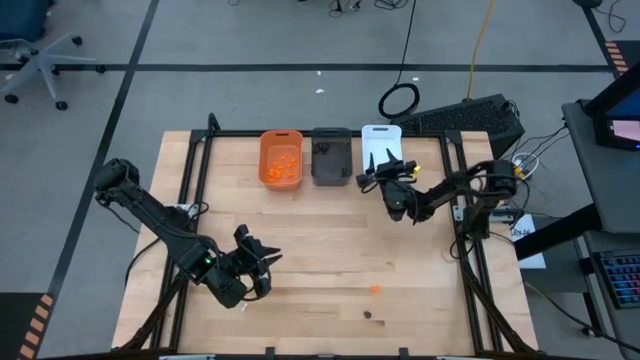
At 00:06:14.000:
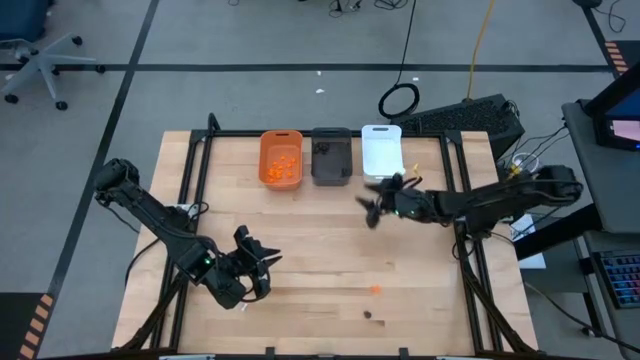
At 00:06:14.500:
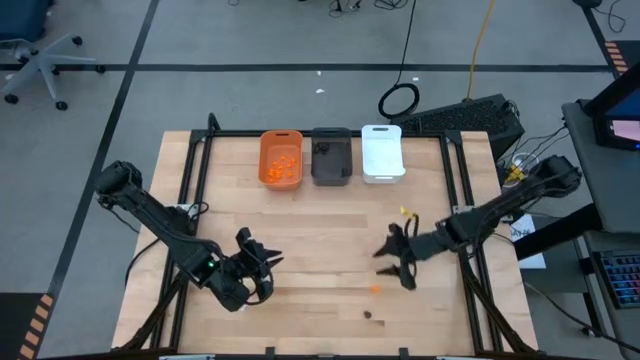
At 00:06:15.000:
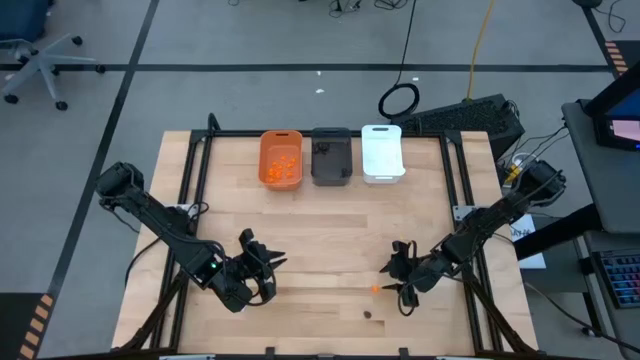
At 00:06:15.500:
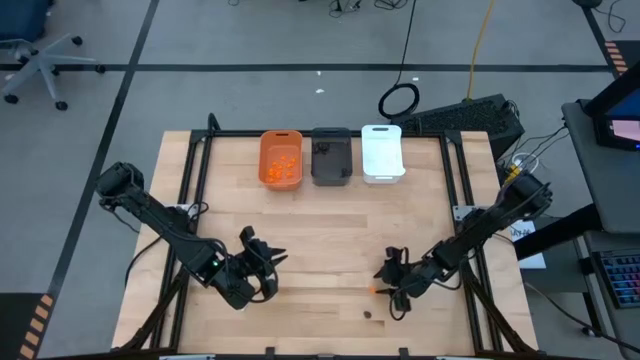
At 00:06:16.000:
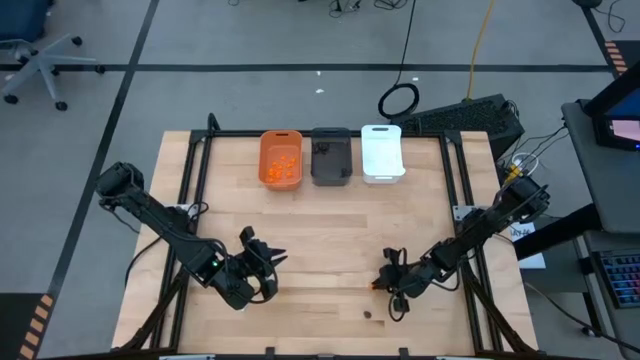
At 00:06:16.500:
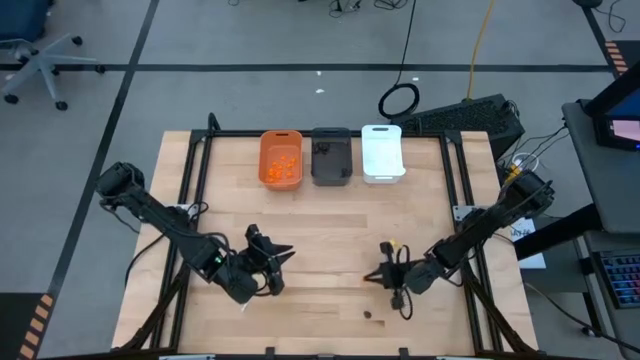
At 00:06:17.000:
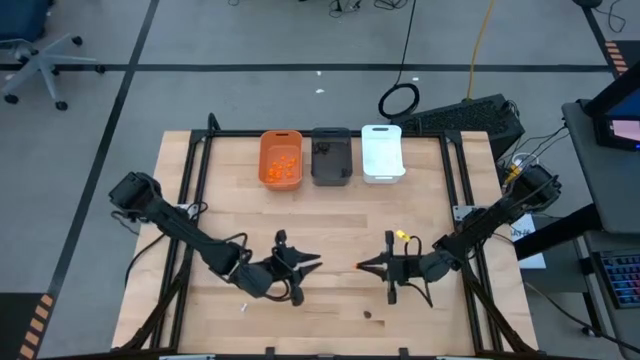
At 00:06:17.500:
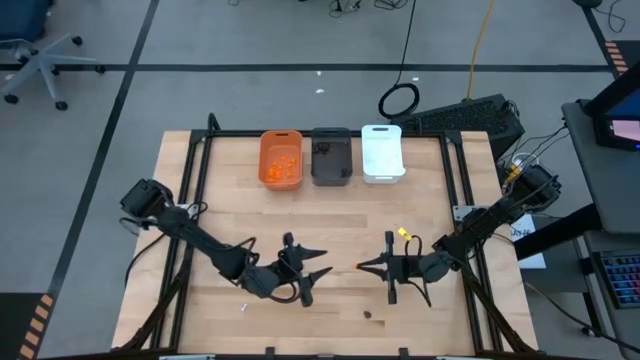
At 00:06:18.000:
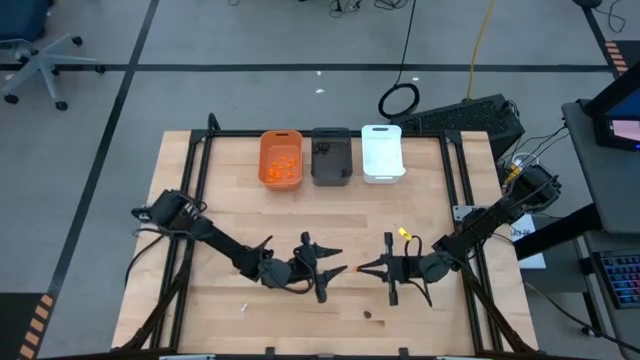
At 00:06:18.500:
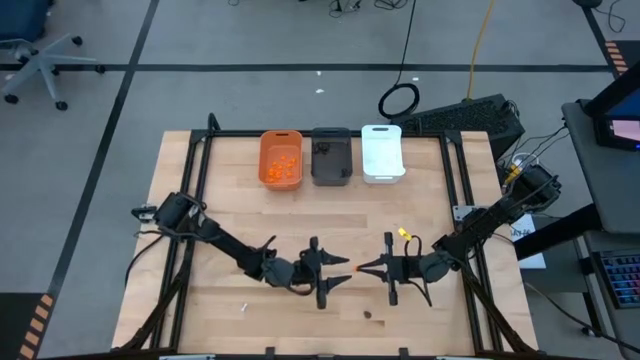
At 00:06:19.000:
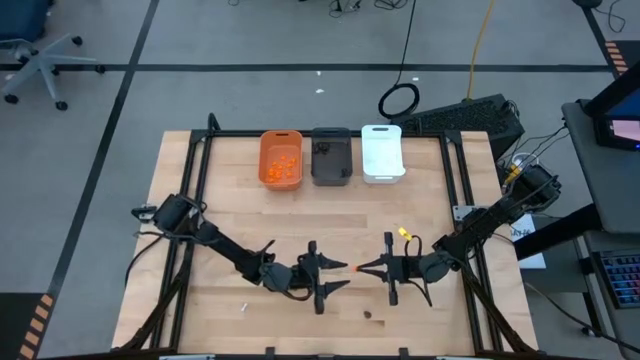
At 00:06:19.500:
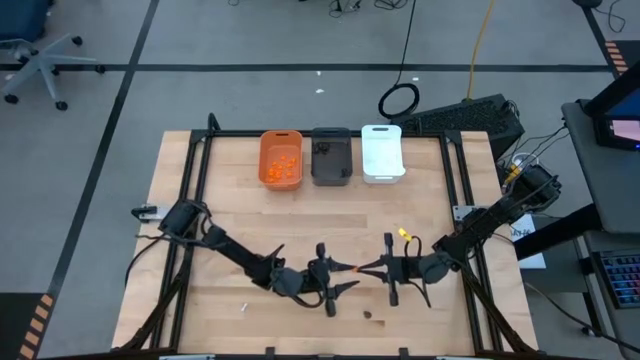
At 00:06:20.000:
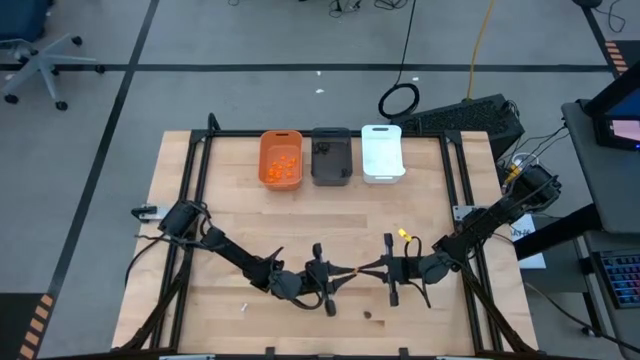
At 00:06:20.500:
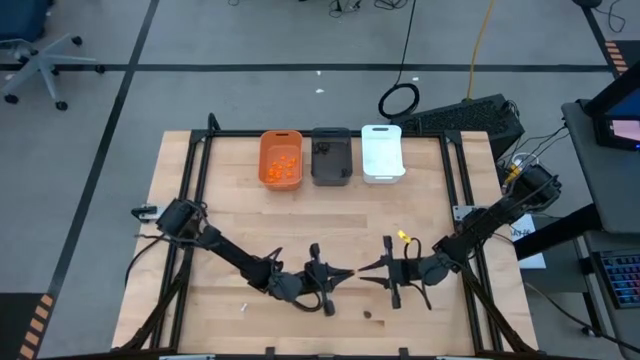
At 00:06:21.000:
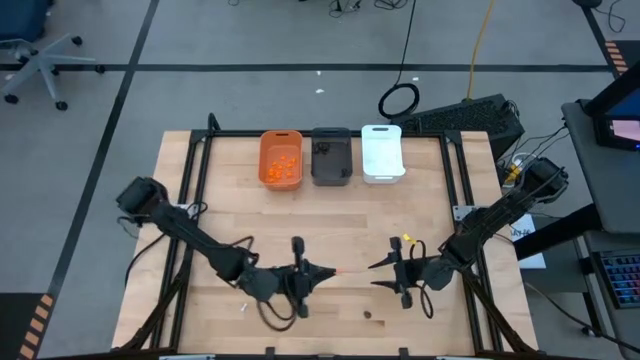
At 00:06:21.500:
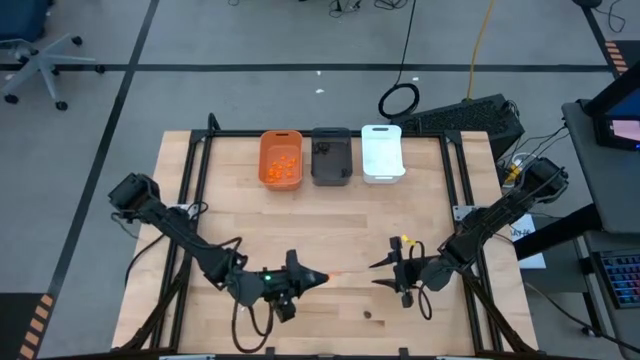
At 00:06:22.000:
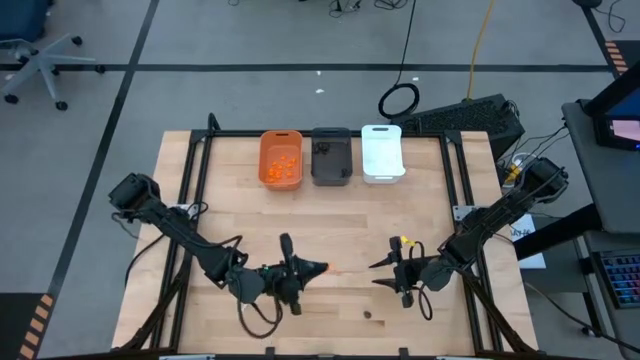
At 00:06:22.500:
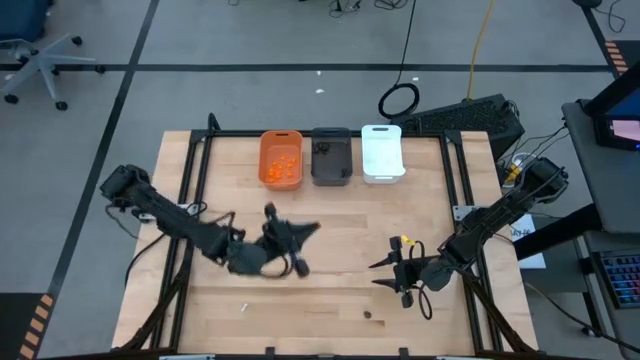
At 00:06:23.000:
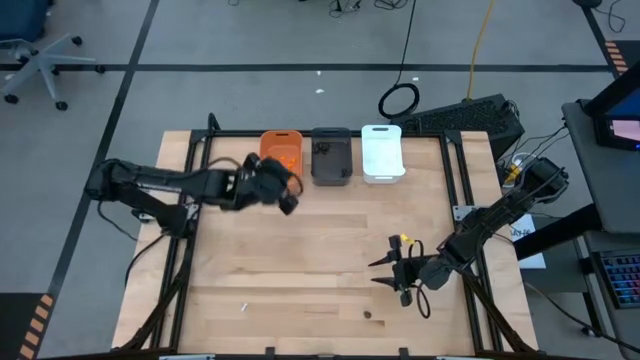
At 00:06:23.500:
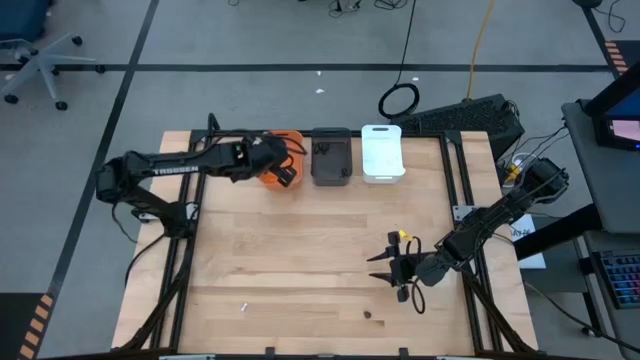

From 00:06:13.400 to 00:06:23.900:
Task: Sort Halloween decoration
Put the orange spider toy into the orange bin

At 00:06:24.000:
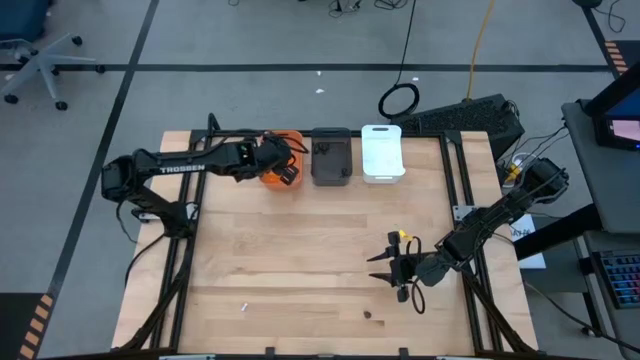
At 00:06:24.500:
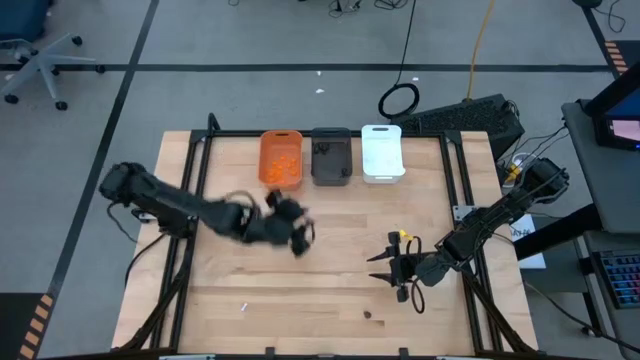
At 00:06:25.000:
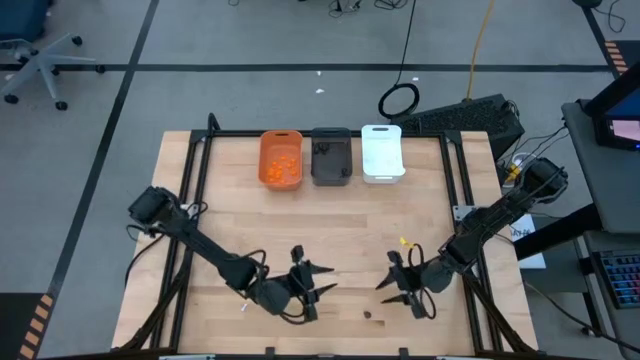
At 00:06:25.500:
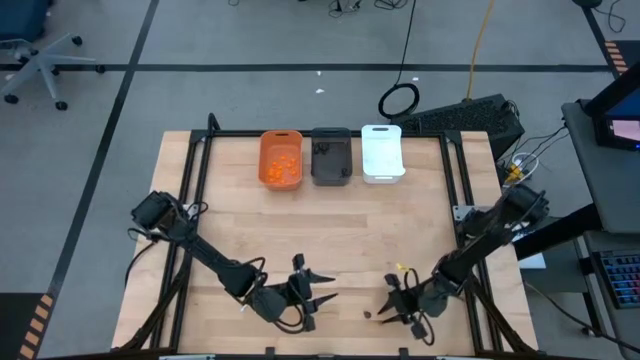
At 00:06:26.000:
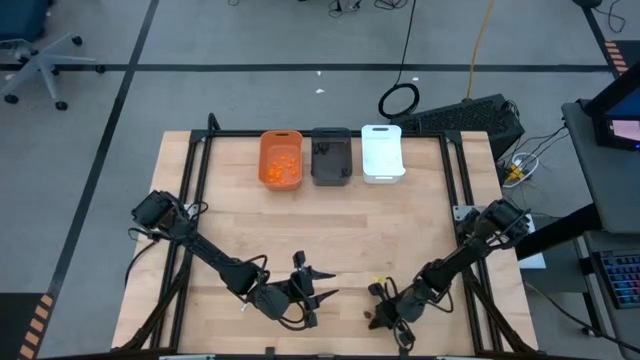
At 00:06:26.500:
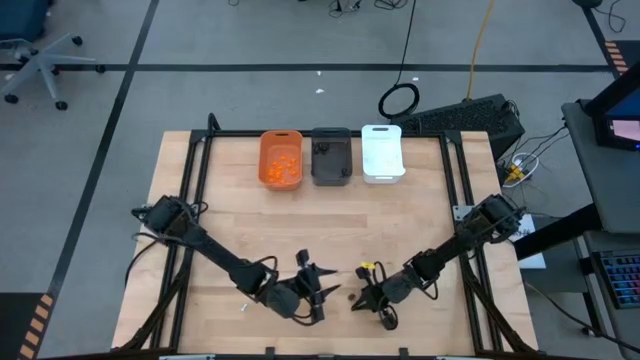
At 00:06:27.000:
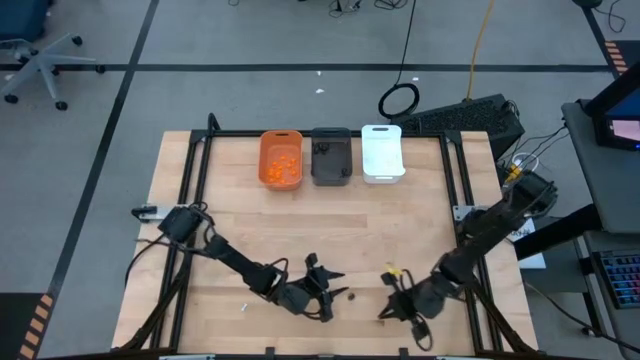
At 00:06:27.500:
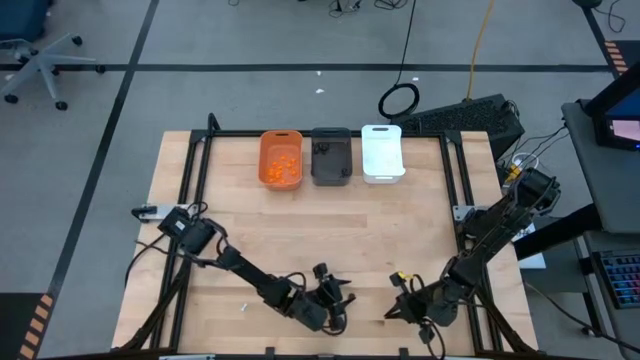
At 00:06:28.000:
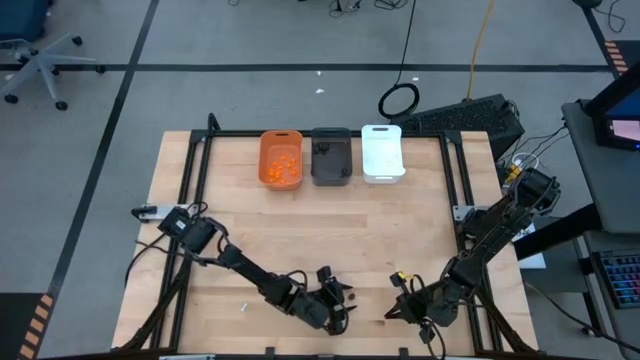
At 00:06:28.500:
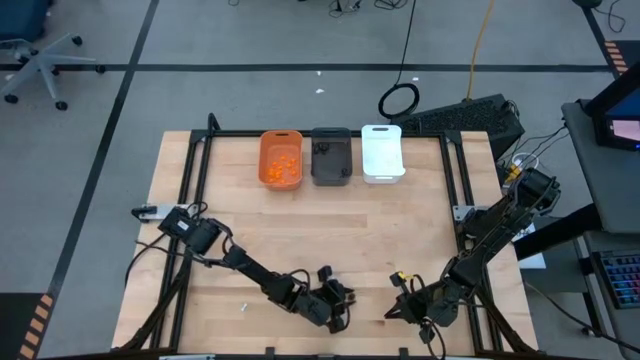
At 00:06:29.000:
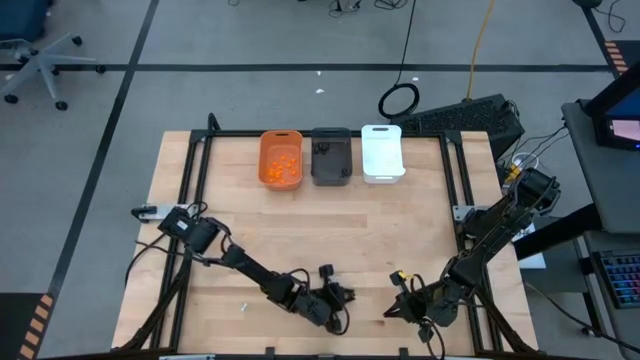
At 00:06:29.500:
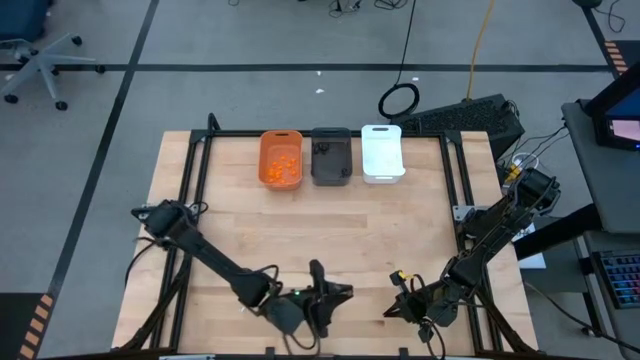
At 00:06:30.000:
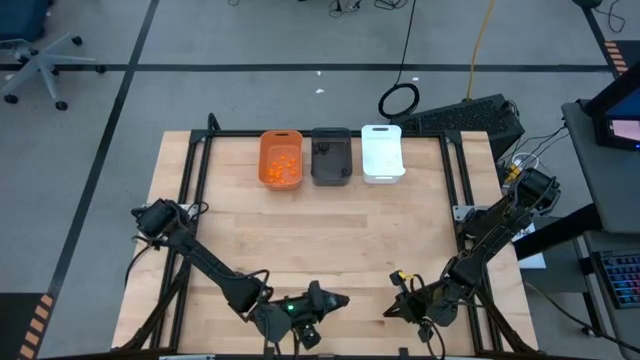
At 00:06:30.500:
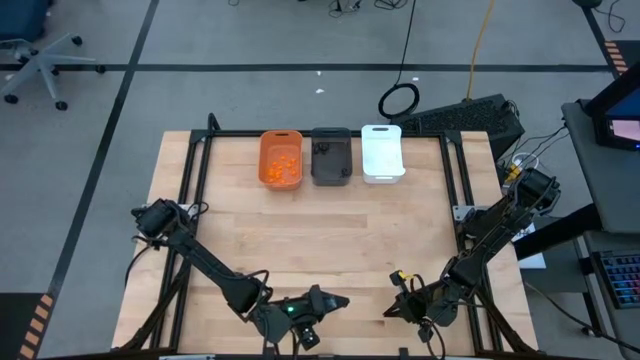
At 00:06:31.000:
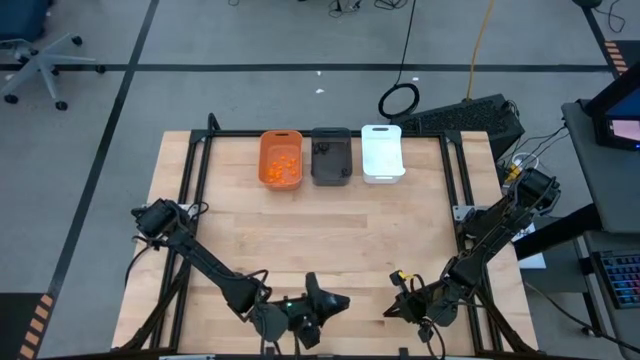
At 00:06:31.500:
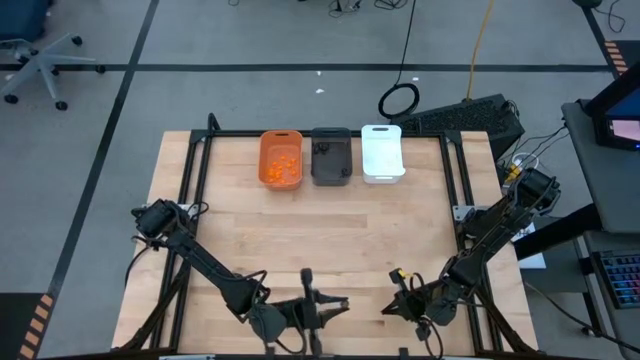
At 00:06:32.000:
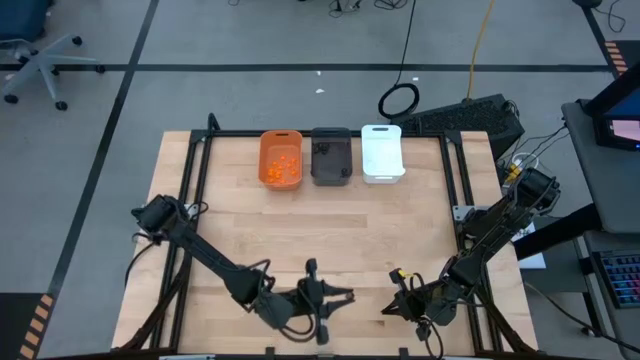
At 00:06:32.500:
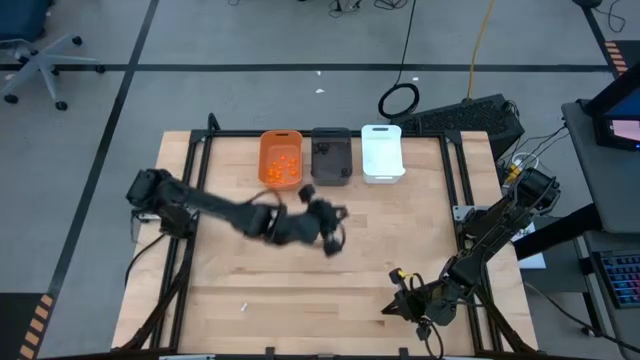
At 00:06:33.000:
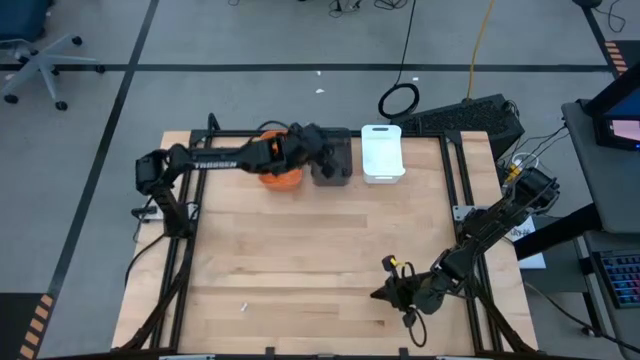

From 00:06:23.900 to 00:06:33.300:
Put the black skull toy into the black bin
